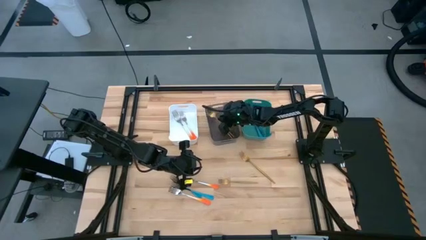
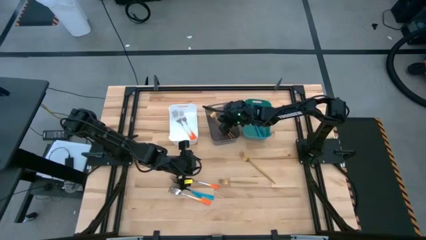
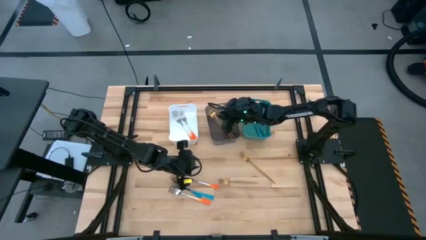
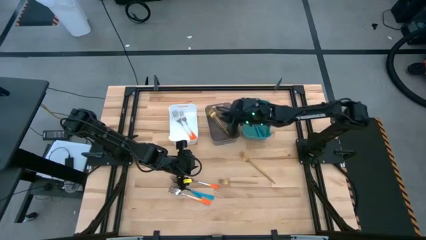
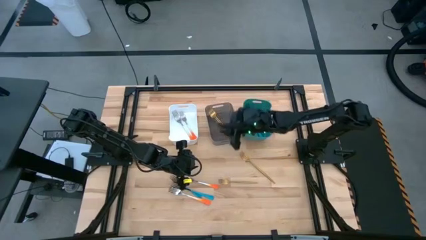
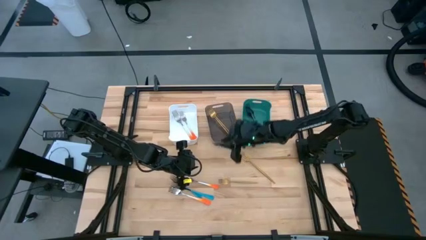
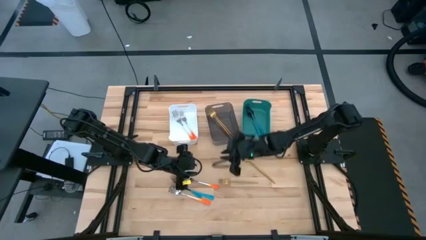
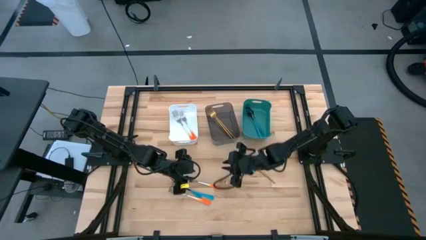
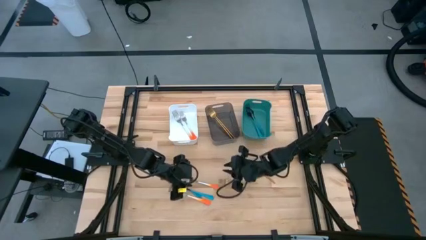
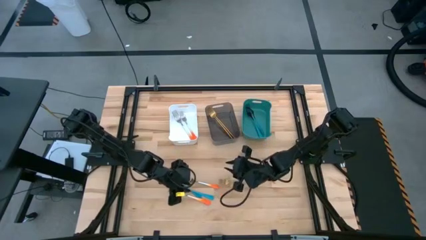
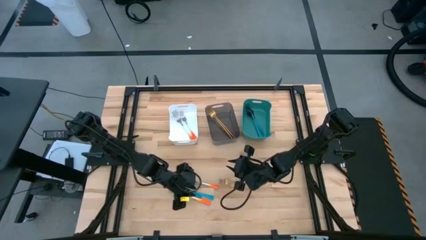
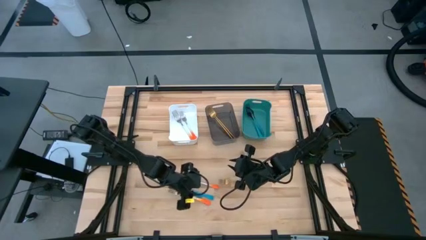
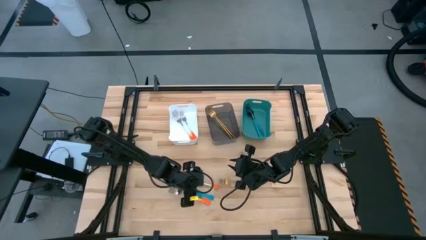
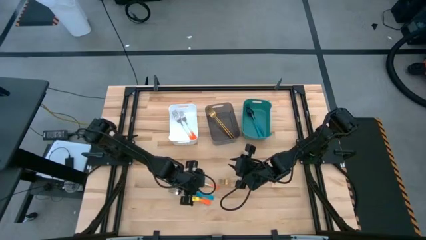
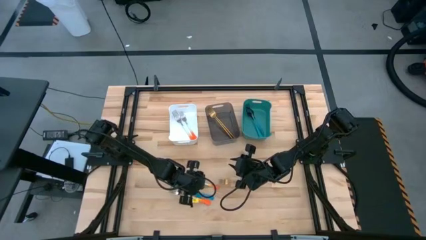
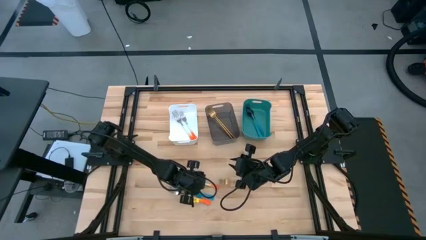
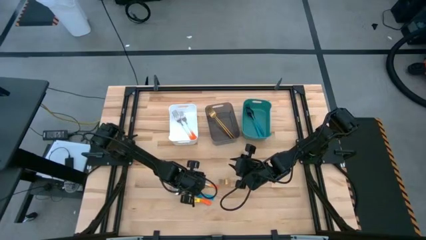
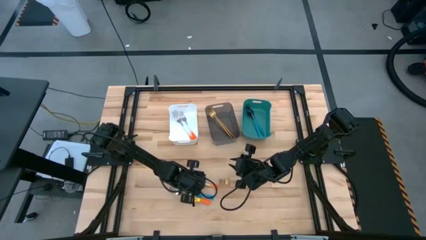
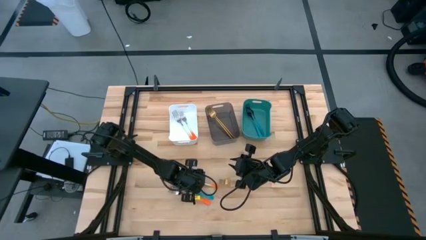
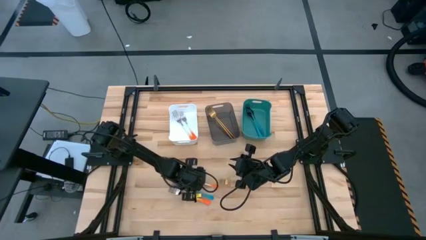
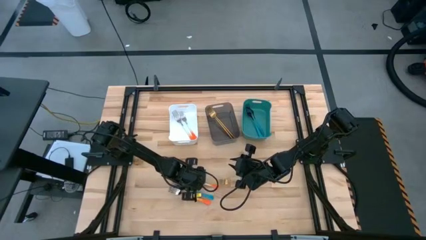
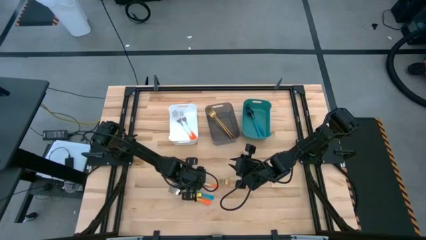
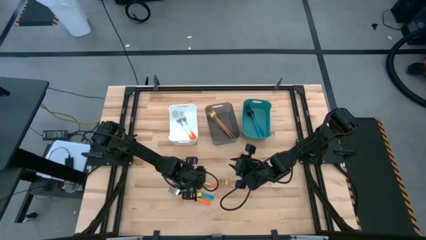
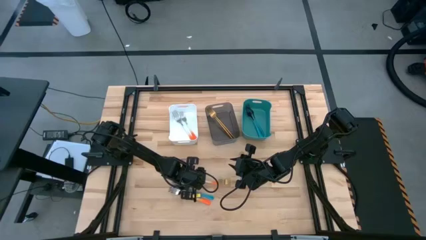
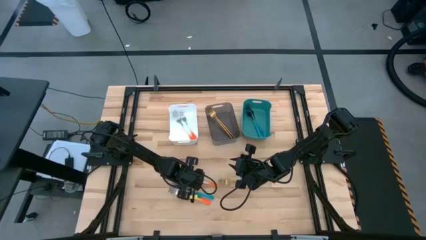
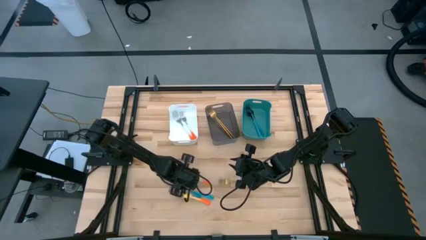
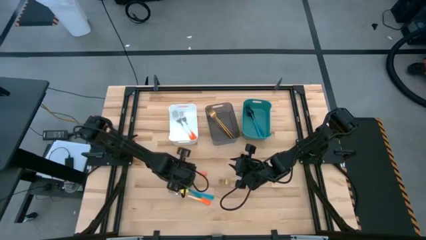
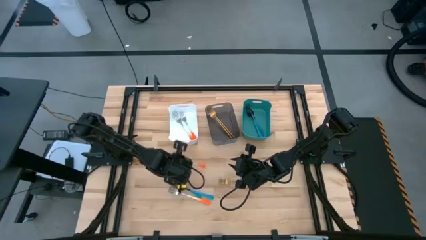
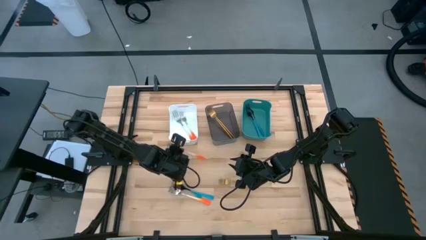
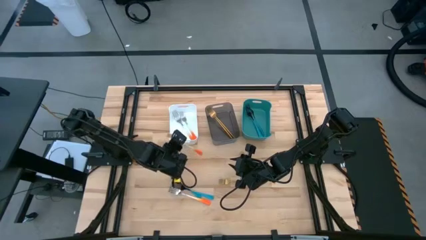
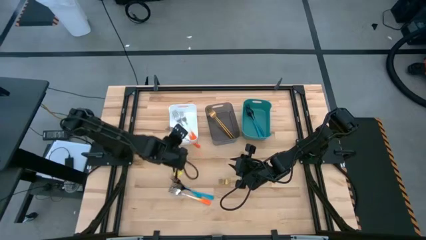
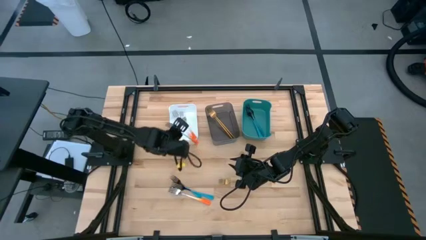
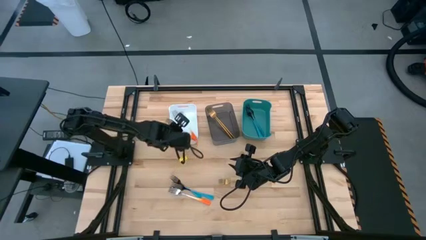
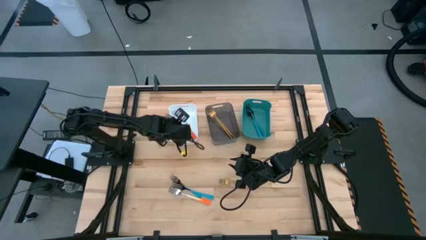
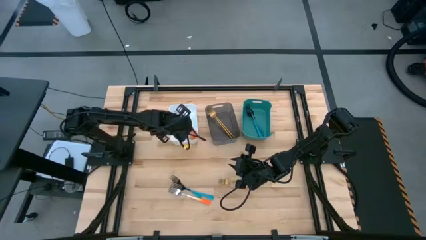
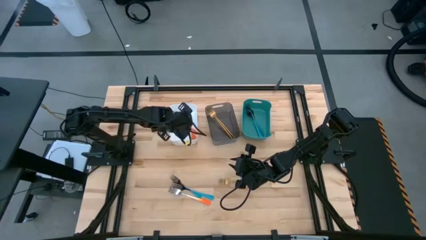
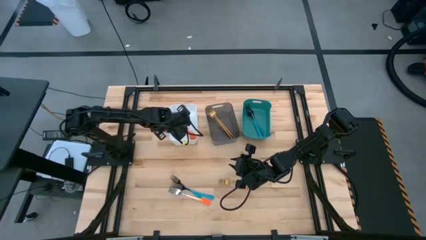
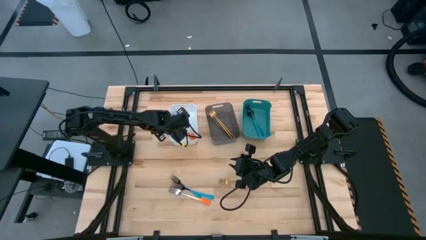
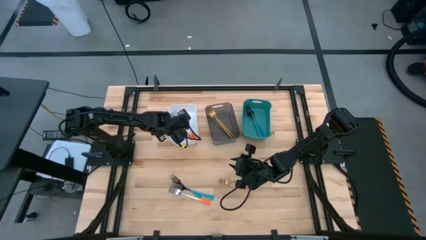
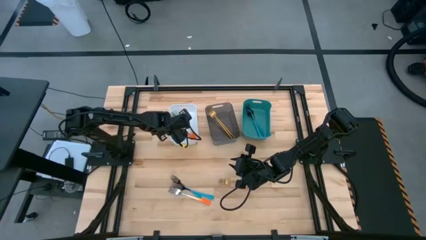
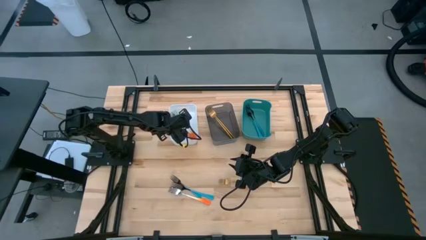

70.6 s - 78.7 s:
Task: Sort silverware by color (type)
Put the orange fork into the white bin

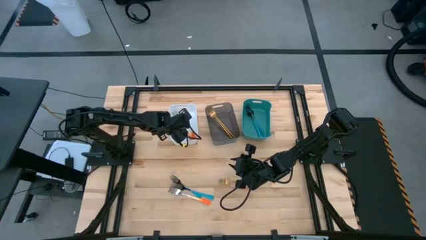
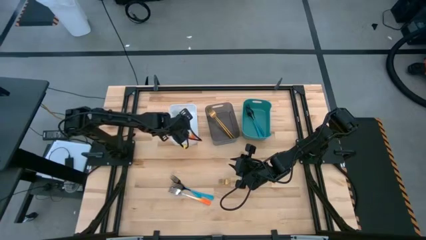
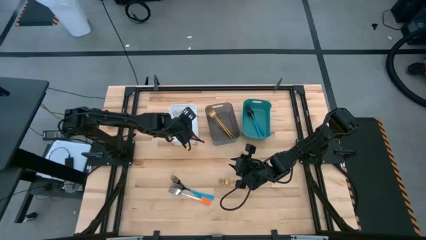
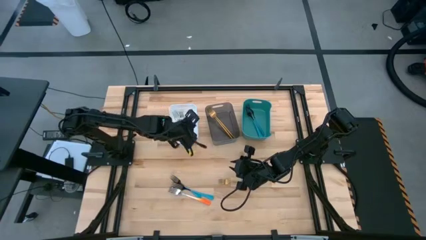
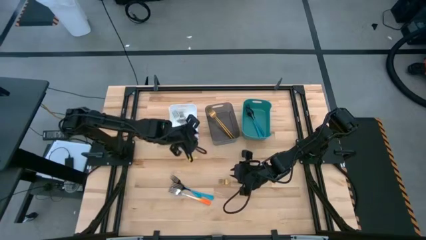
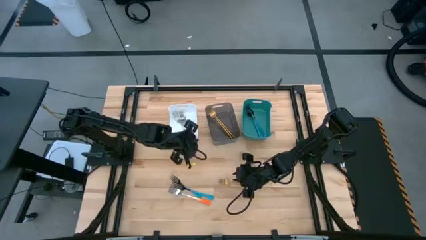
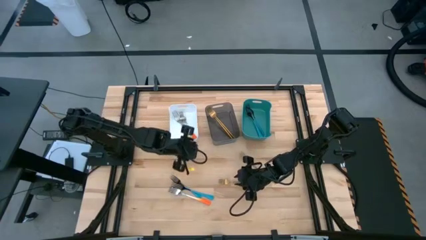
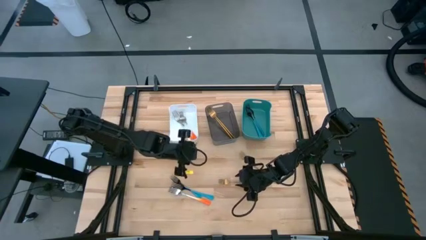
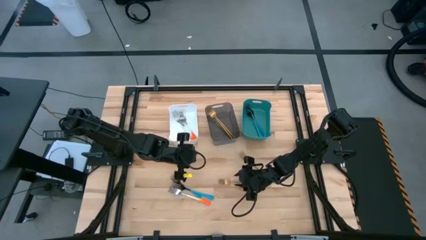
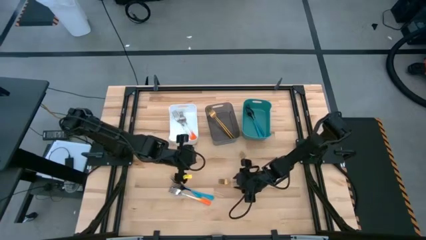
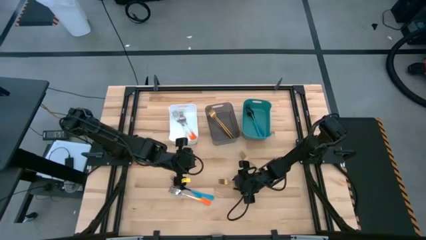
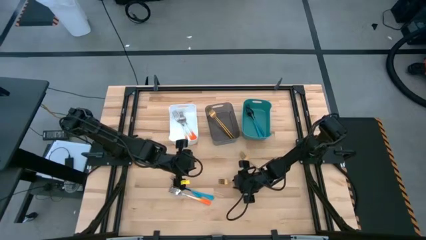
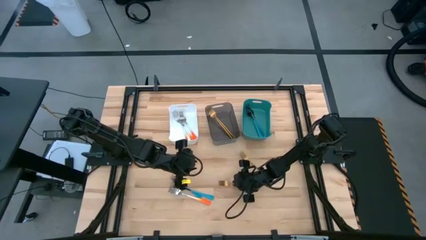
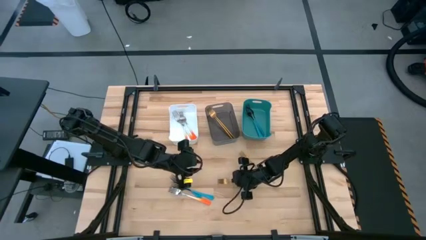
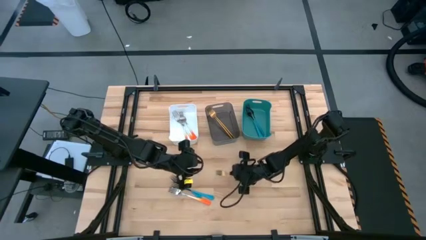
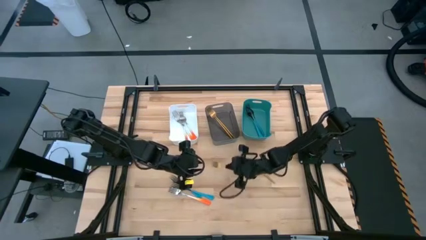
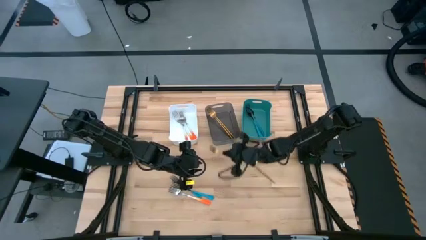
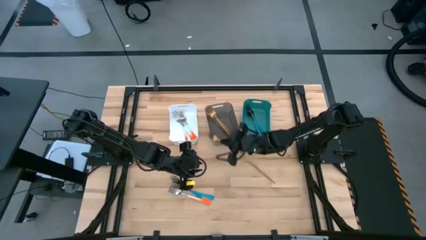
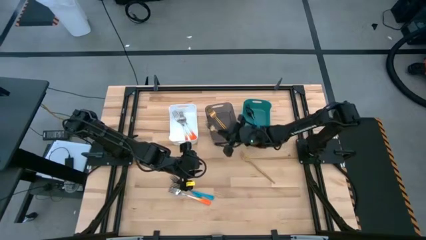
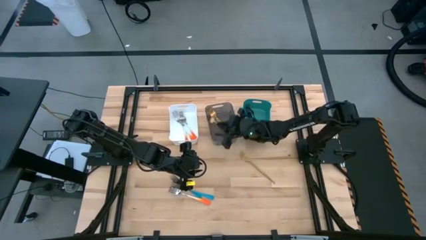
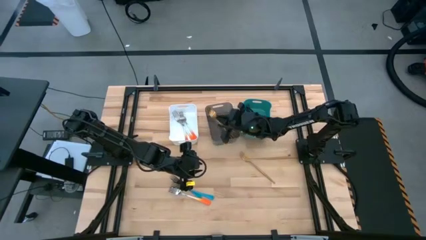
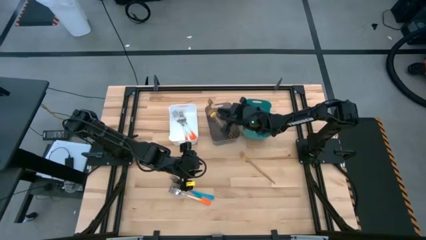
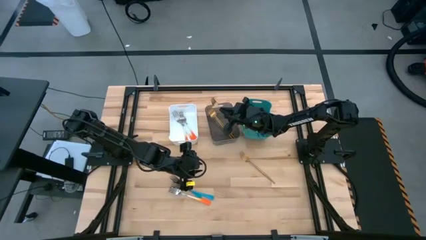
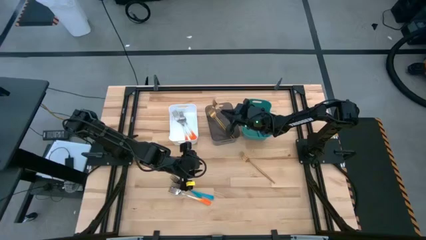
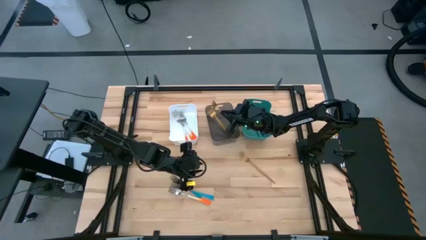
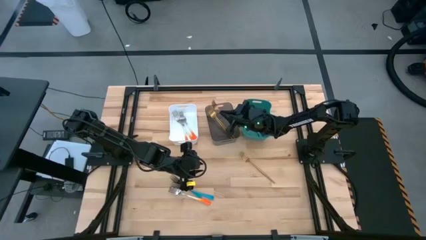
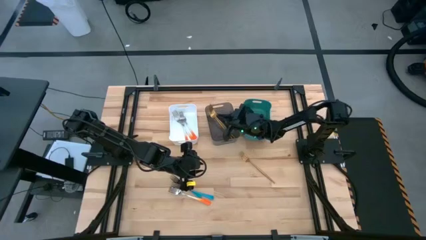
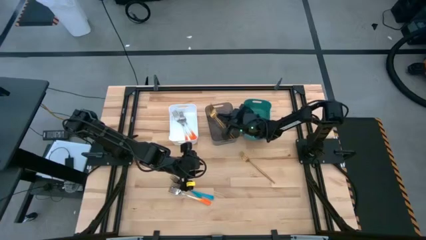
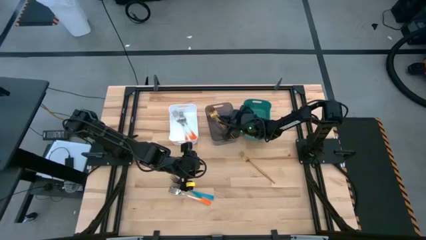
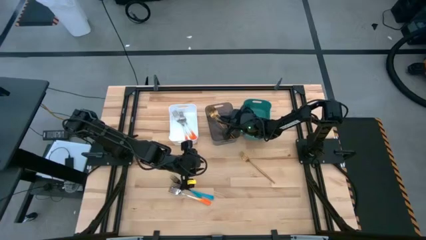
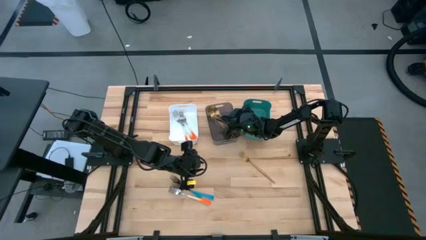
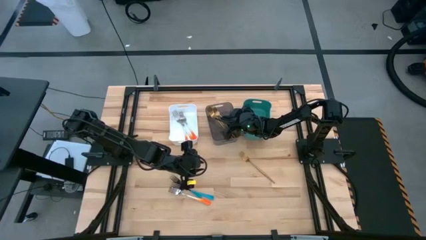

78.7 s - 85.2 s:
Put the gold fork into the black bin
